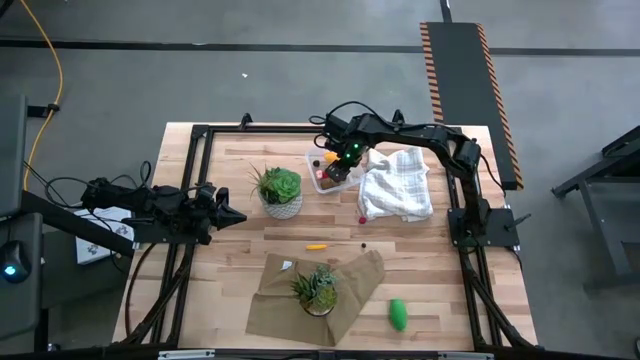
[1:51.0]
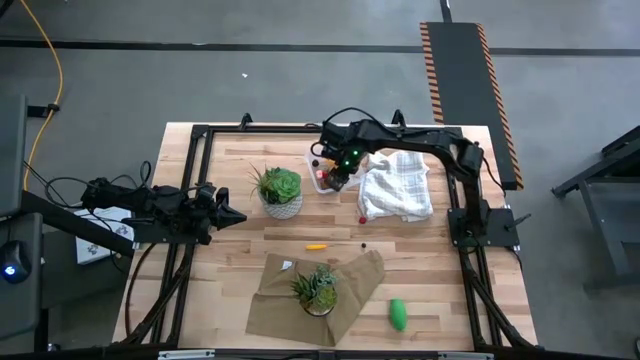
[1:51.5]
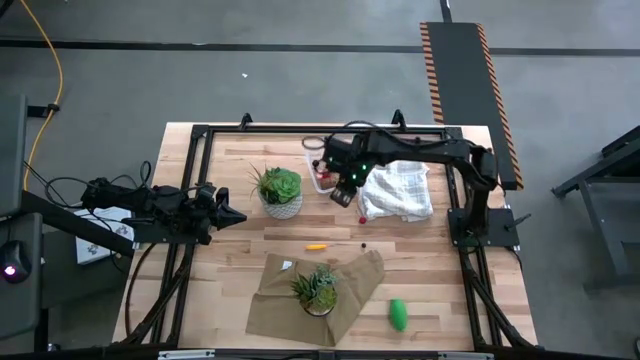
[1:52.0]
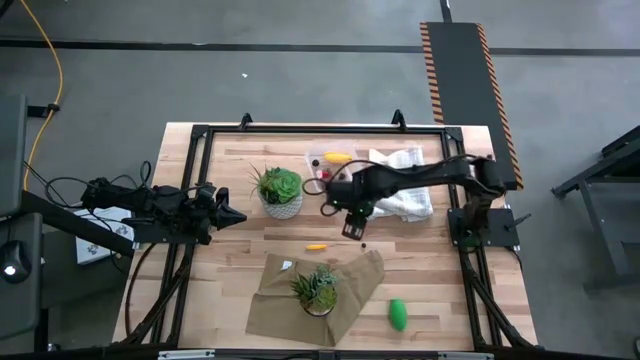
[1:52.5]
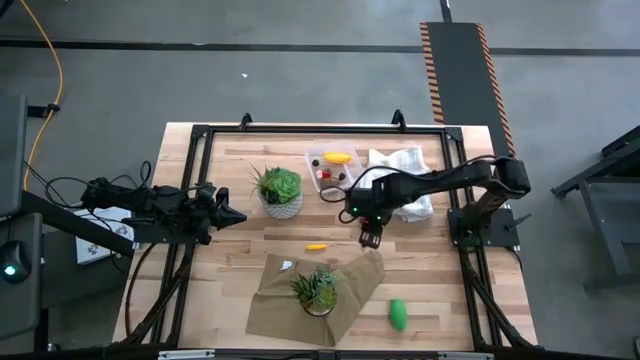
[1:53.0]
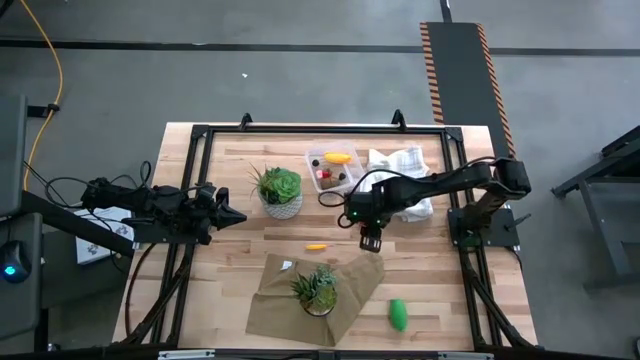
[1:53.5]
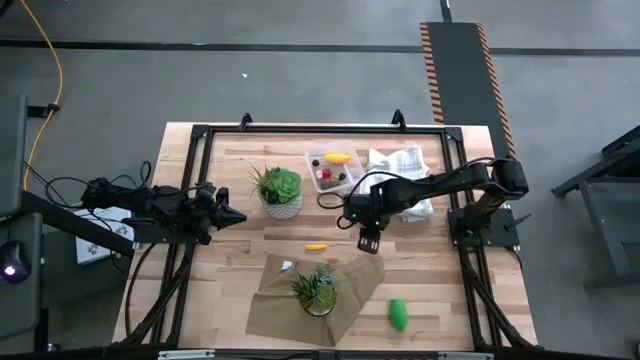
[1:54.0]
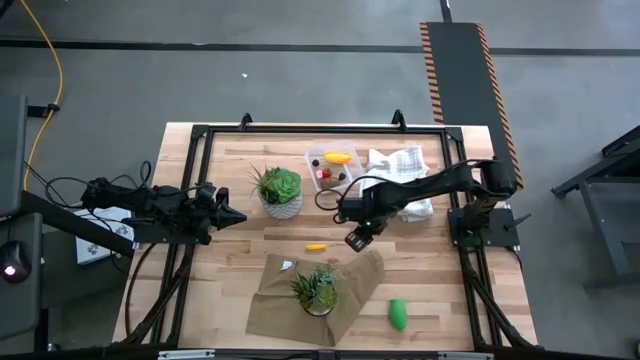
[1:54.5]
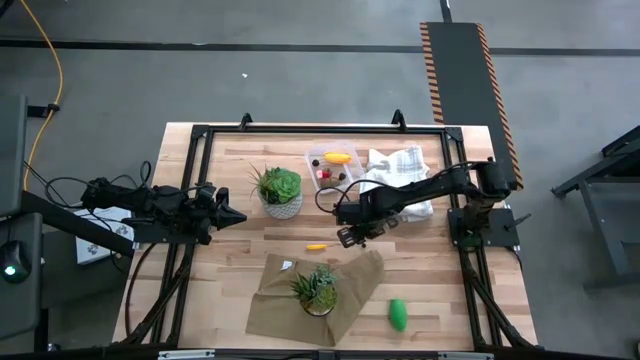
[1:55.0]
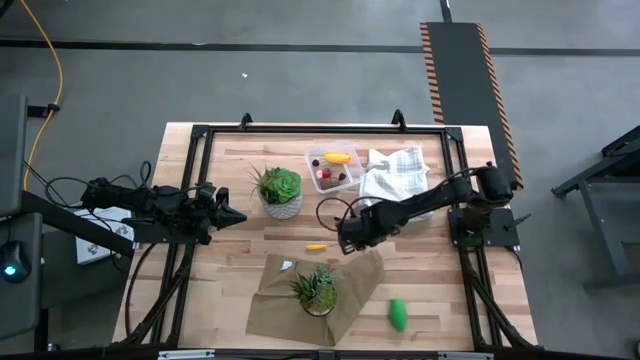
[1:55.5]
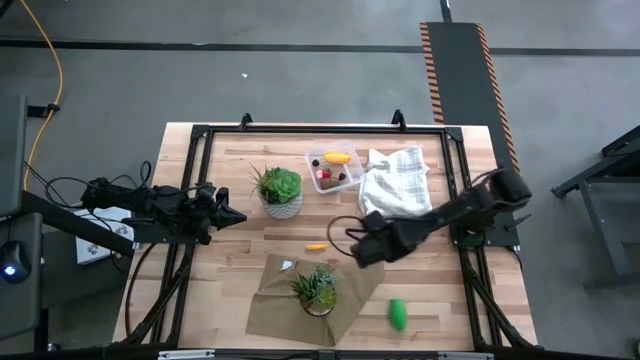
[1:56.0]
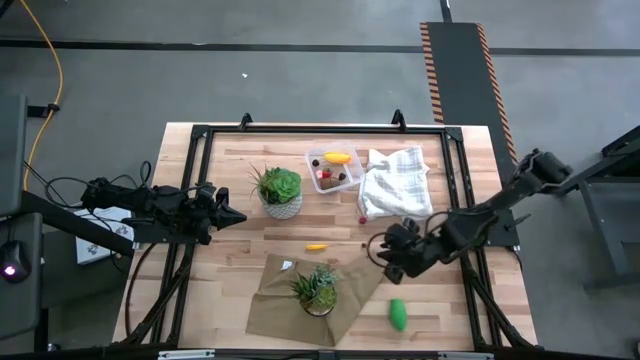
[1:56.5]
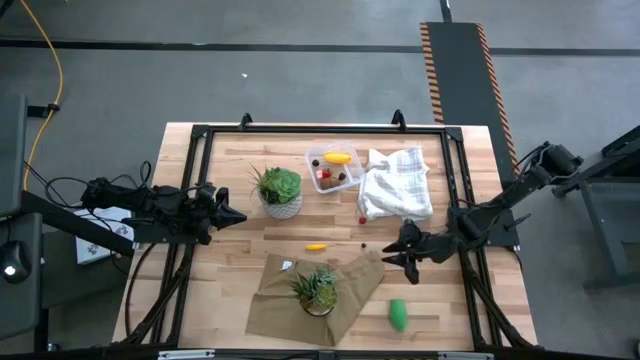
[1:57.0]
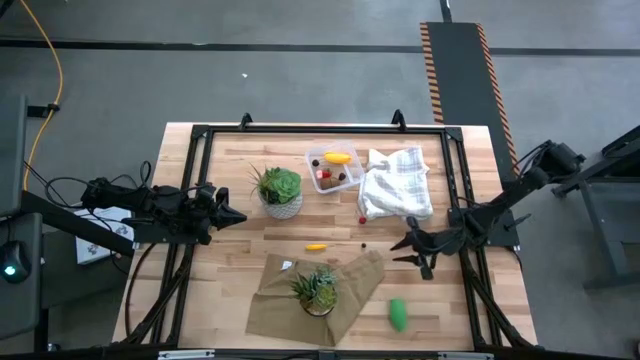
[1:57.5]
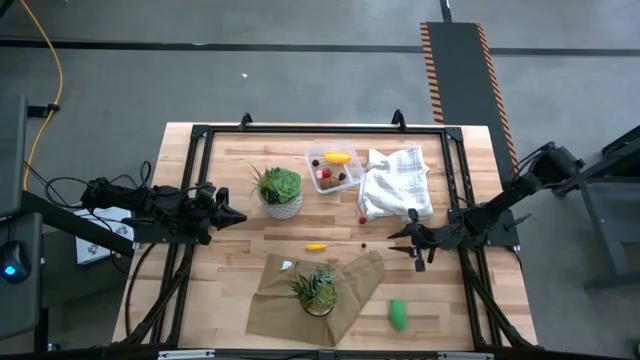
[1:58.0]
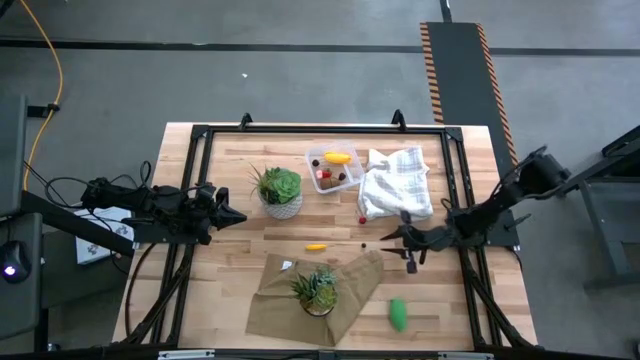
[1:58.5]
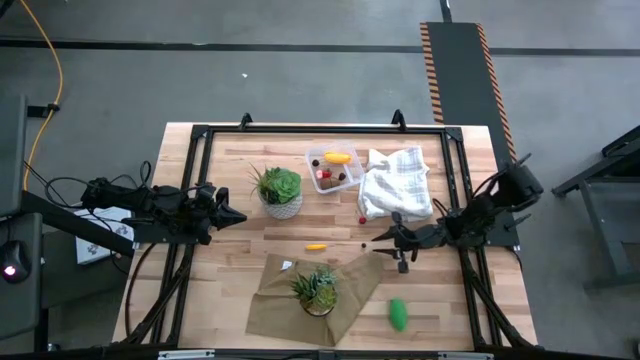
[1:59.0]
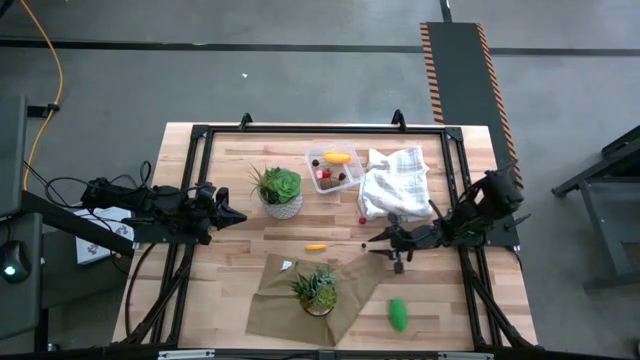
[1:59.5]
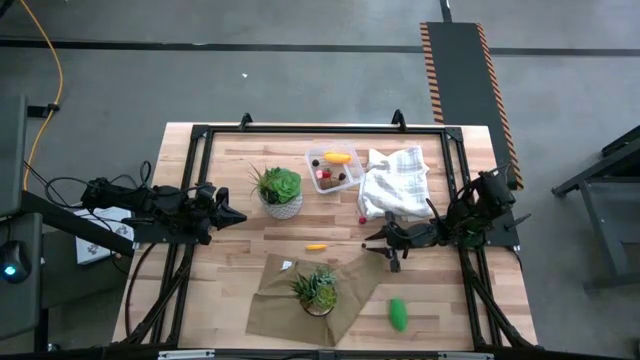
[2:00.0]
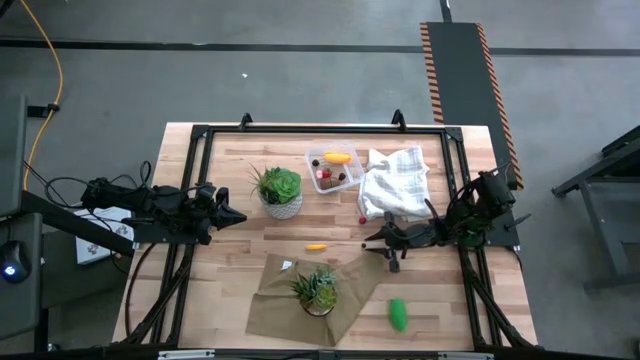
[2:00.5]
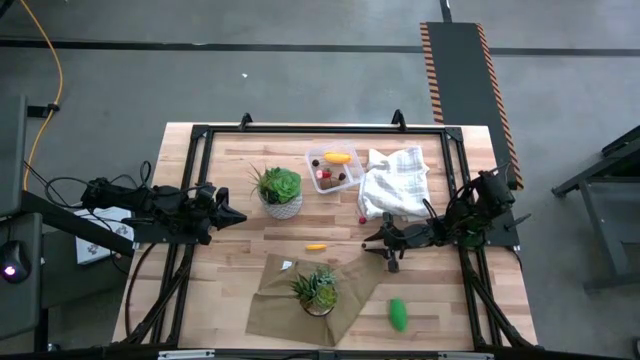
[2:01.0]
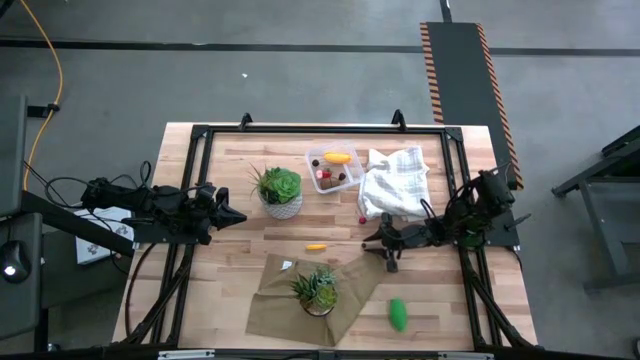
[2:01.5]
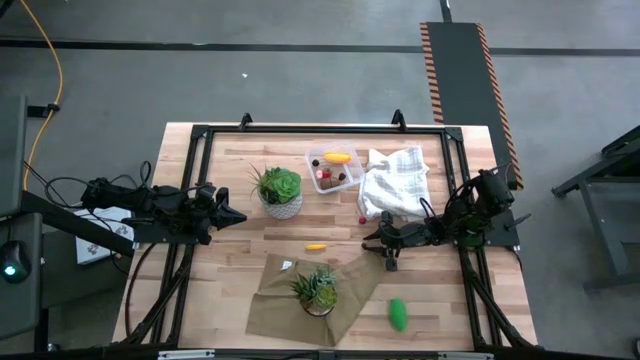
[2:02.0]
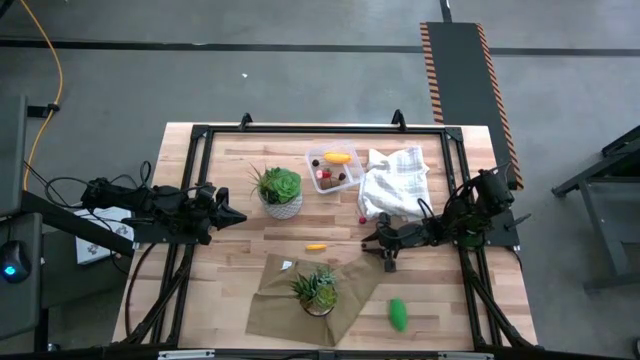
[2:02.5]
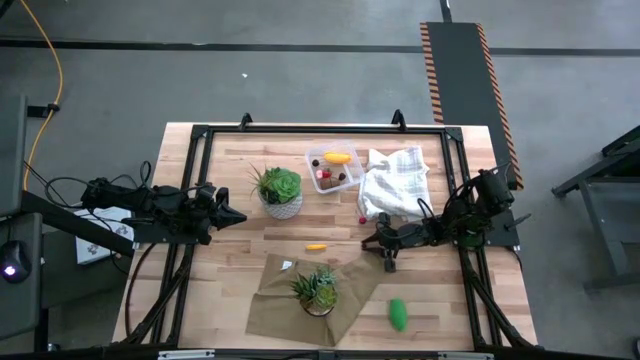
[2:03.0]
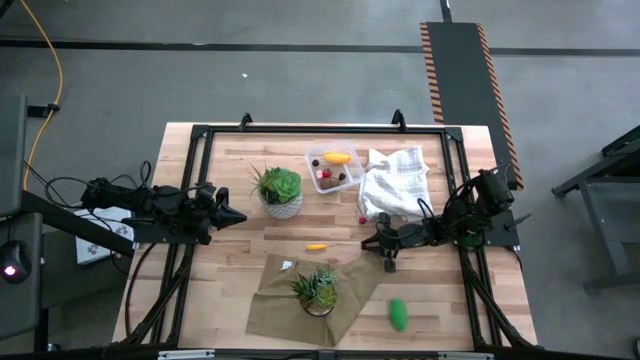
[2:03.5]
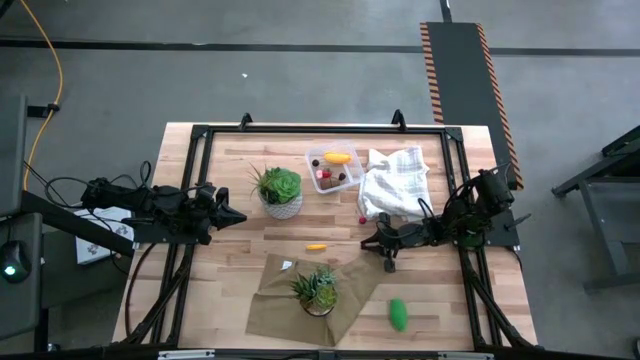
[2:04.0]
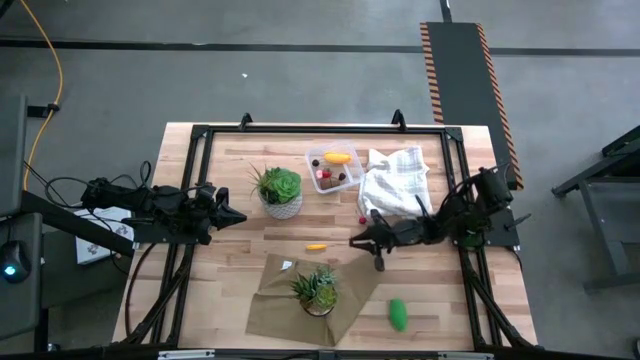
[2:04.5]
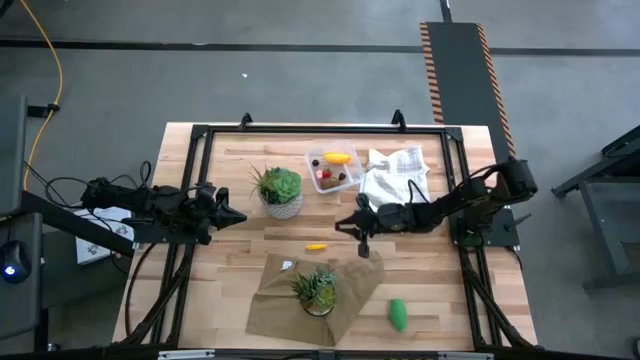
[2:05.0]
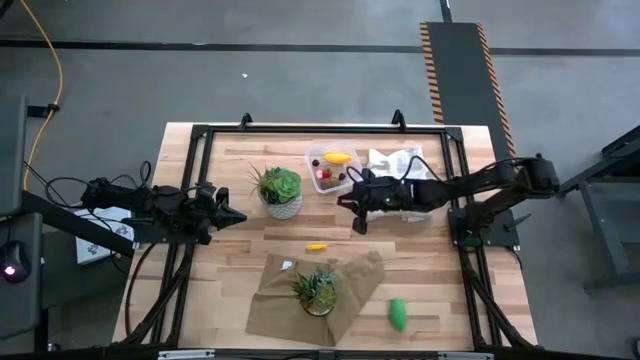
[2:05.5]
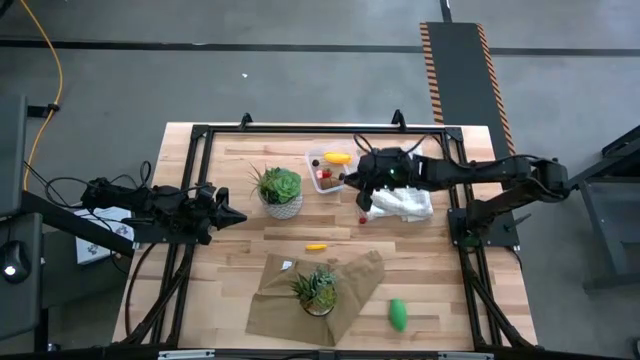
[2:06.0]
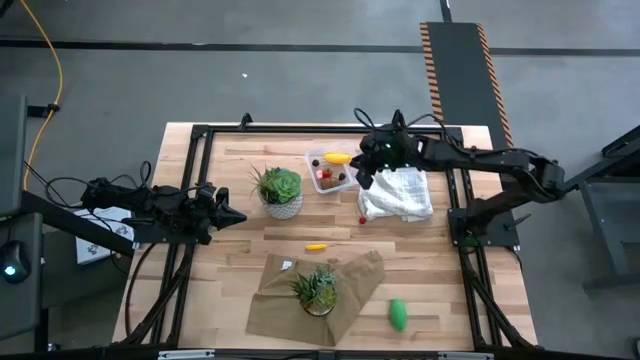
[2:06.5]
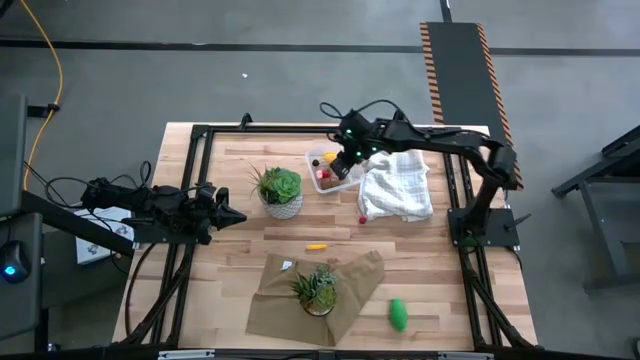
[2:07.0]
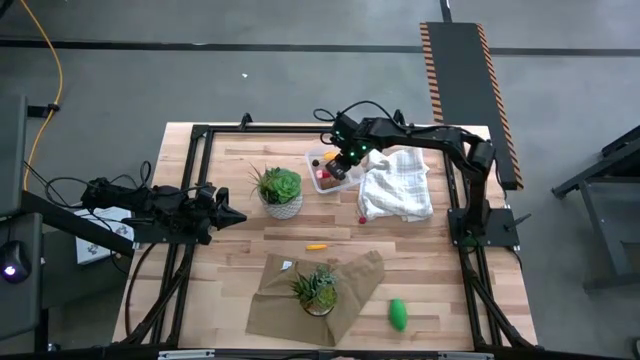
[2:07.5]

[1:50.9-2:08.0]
Task: Pick and placing Produce into tupperware
Put the blueberry into the transparent bin

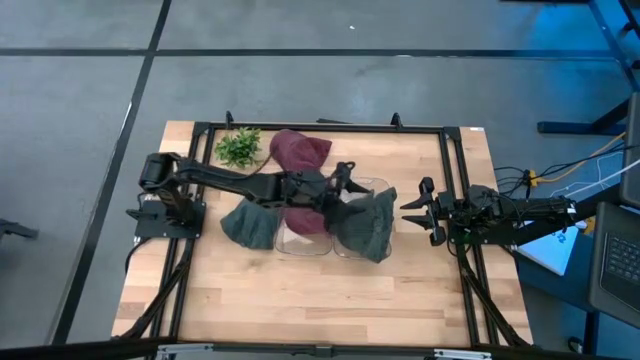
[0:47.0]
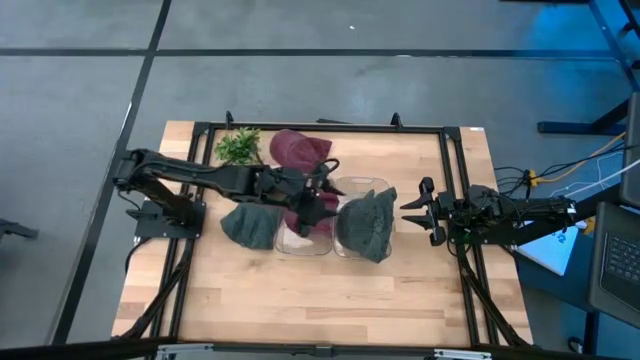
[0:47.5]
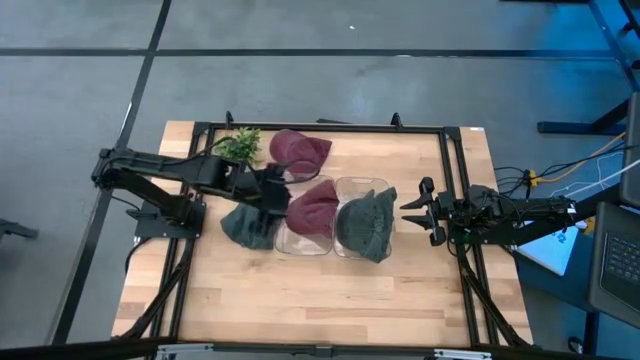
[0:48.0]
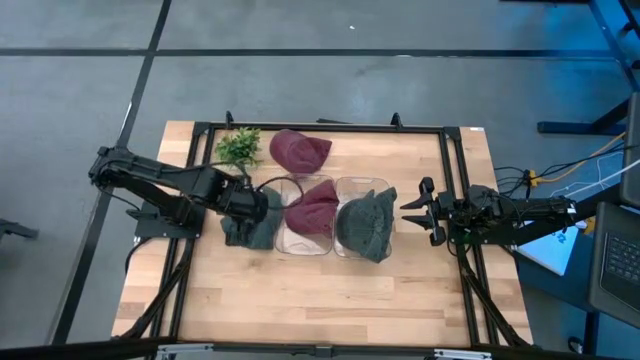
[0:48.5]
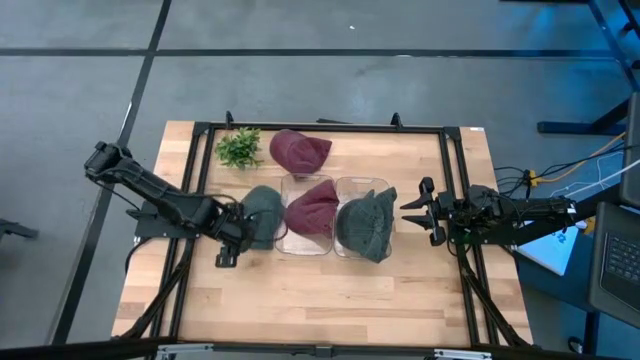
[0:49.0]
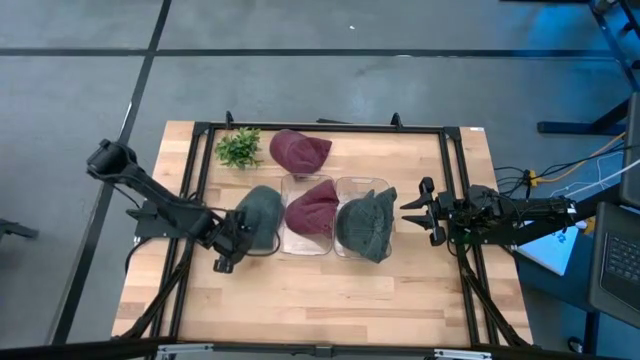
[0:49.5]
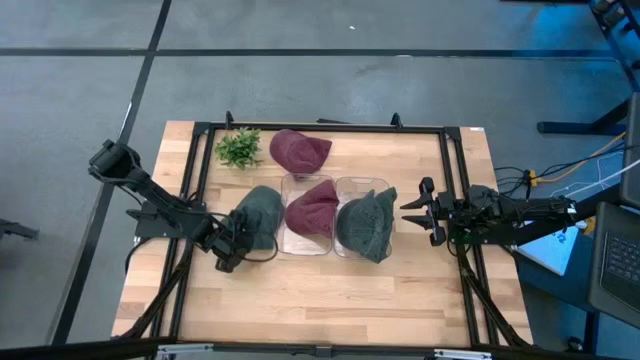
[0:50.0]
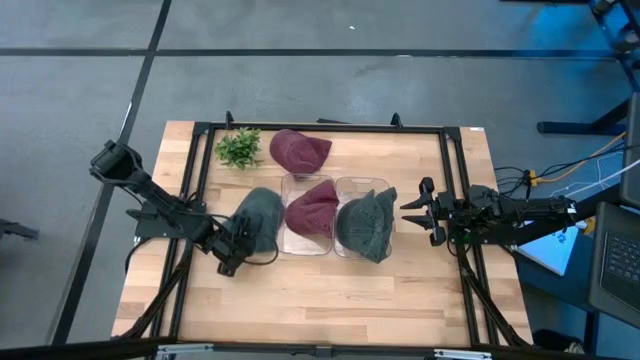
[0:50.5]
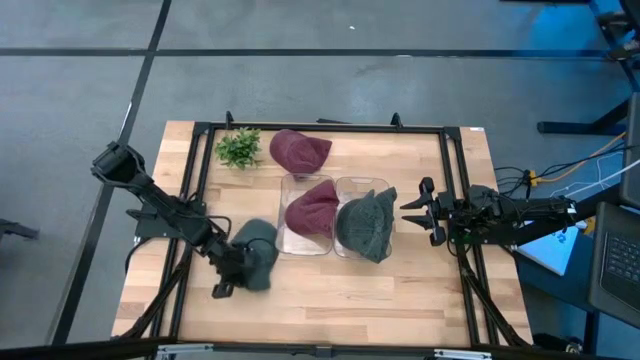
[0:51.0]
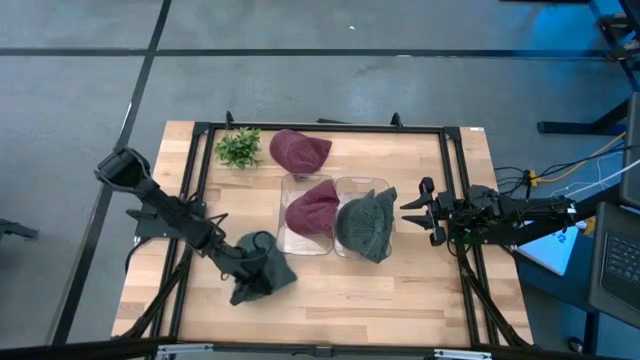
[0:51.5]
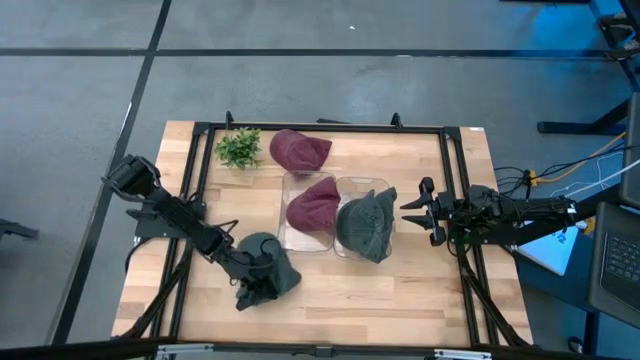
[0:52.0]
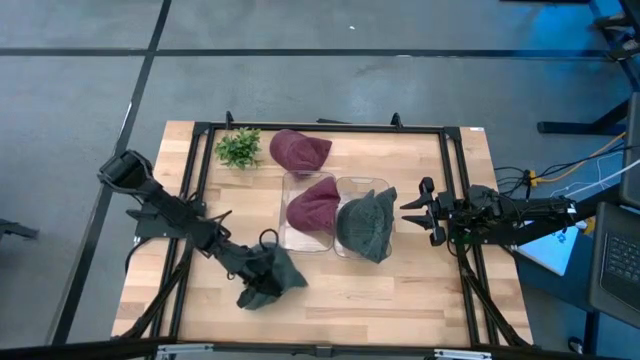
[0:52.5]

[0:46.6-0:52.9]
Task: Pick & Place hat
Put the blue cap into the right transparent bin
